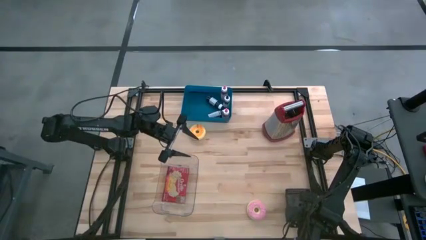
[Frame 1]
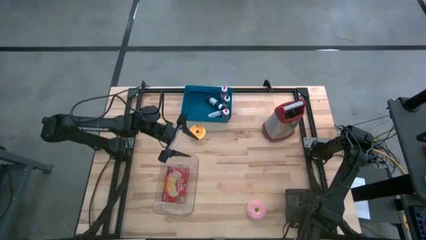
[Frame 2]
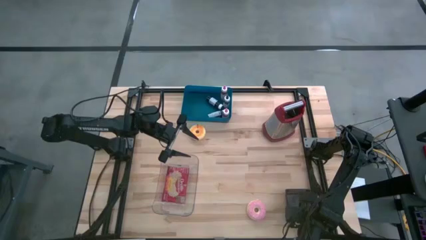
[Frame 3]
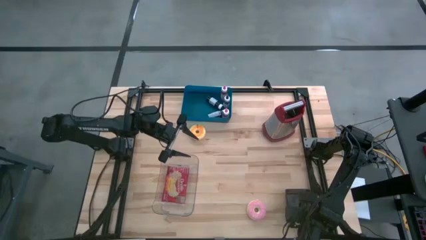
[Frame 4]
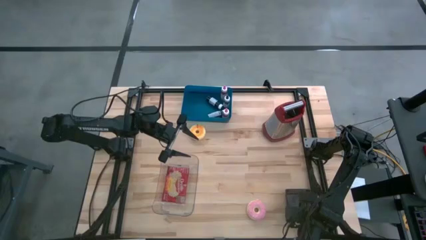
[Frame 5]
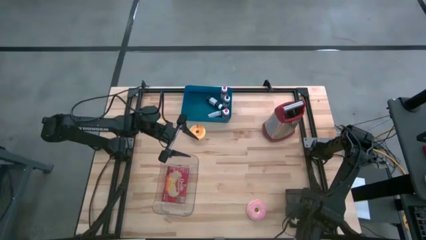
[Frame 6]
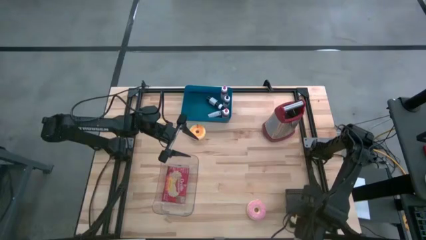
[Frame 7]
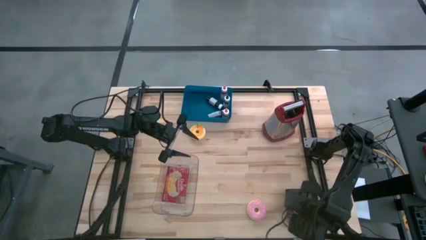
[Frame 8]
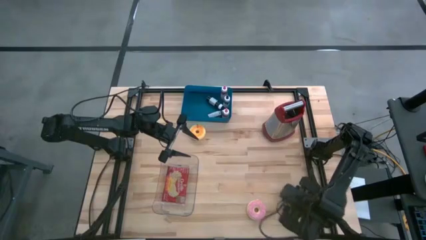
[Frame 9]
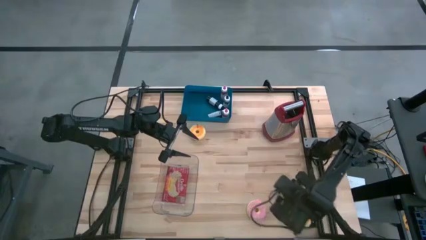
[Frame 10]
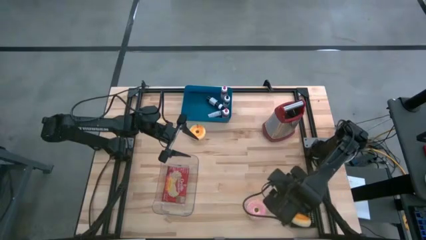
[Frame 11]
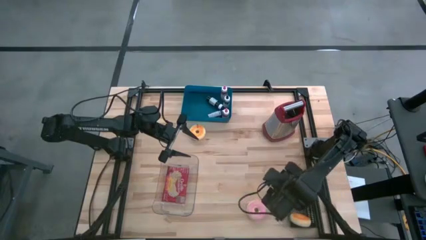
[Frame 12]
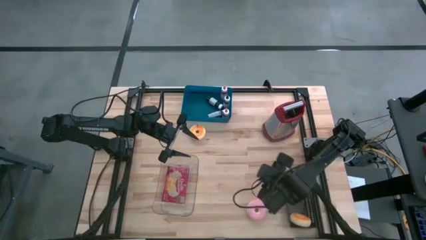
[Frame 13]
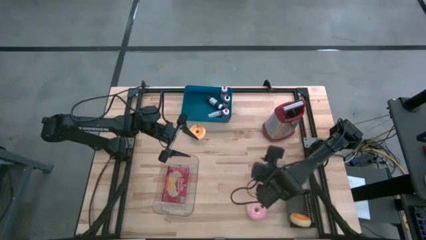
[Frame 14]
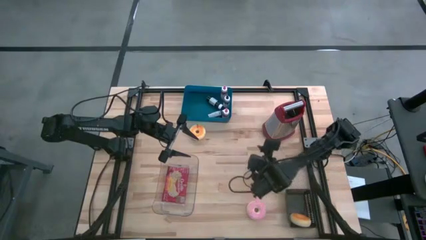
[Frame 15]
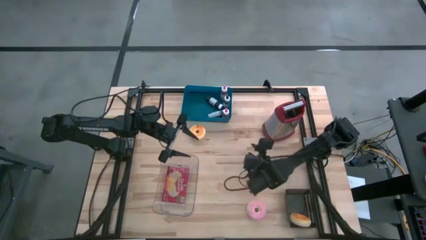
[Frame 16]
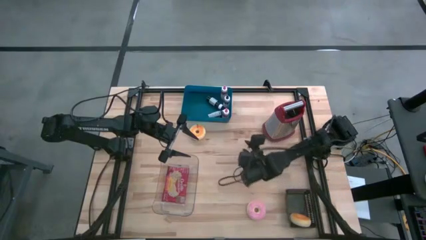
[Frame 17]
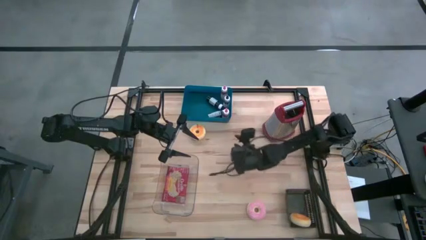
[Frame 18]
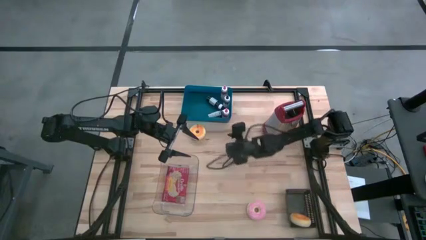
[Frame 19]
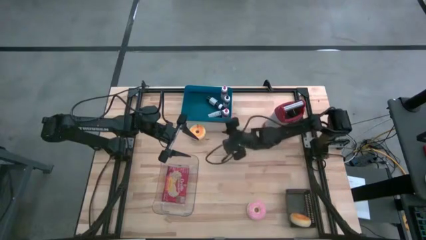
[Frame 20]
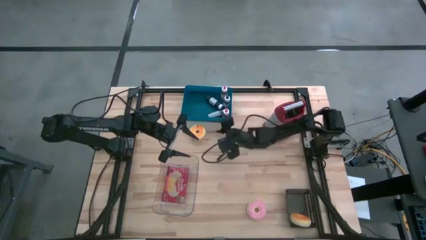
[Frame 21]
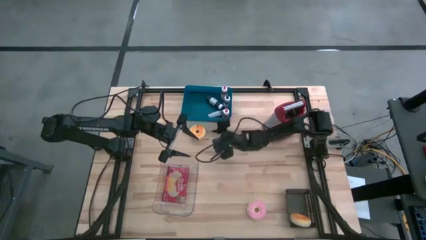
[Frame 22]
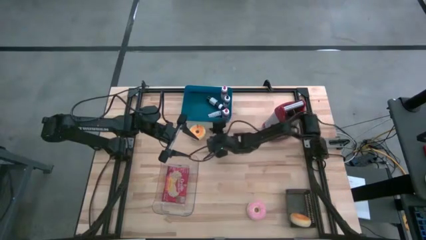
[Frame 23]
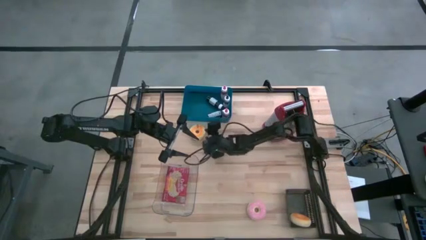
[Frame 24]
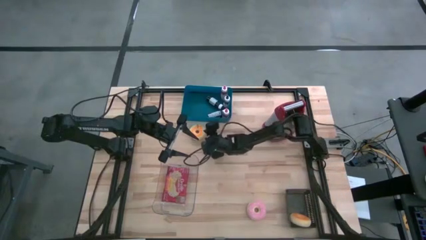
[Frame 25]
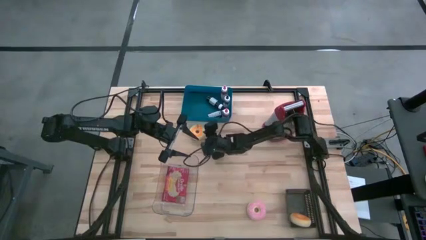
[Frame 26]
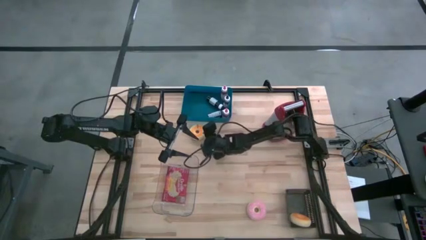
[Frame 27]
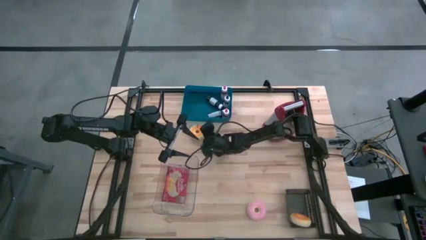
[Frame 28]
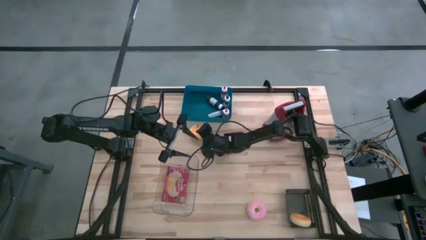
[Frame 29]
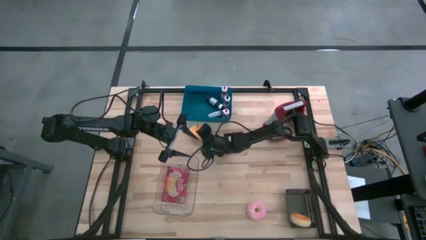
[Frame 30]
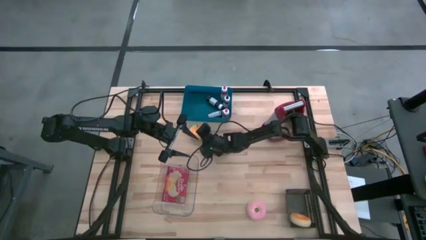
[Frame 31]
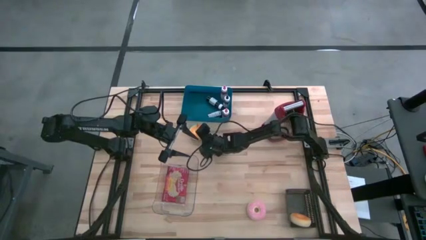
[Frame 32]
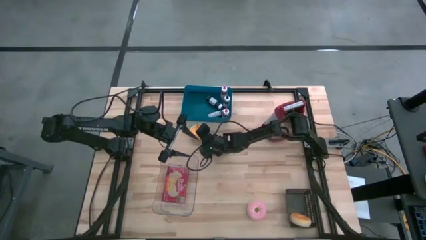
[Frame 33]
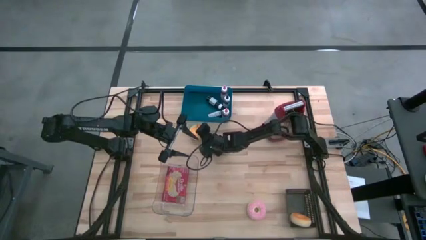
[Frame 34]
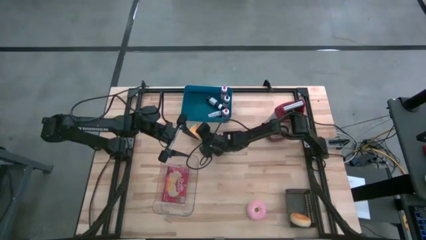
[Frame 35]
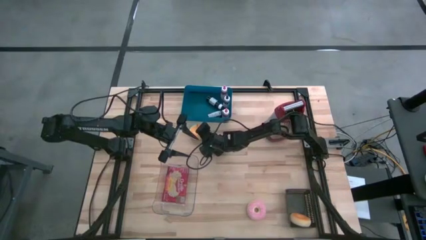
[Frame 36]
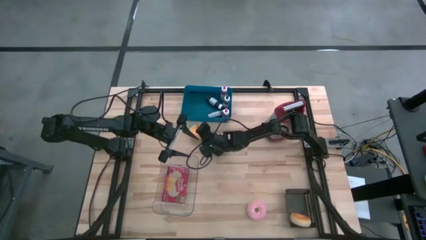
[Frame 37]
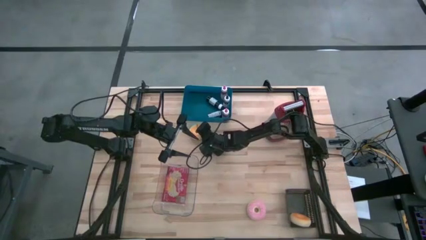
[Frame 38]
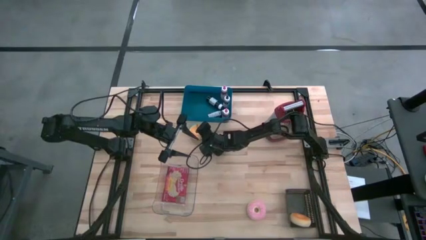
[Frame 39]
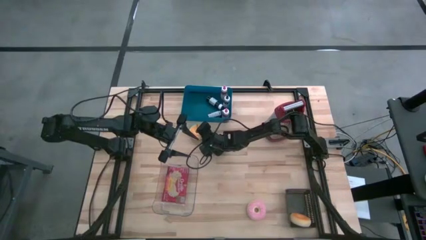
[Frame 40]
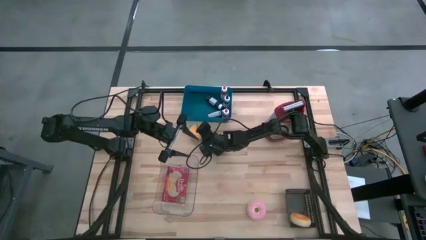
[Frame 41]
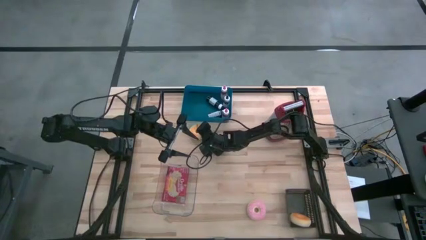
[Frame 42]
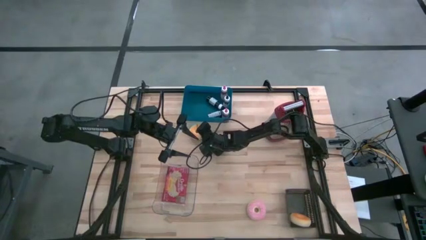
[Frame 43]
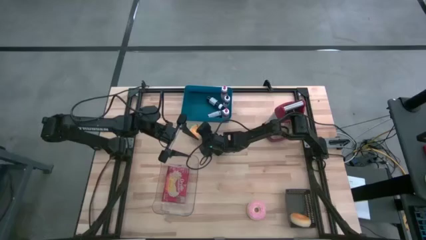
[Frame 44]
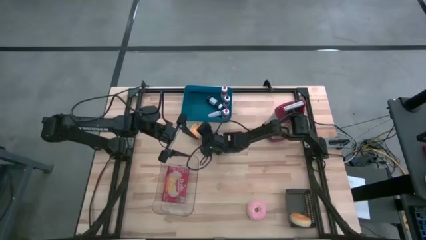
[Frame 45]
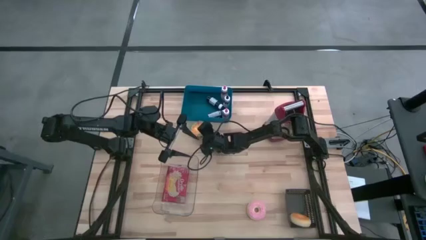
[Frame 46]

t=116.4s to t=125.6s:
Task: Pick & Place Food Item
Put the yellow donut into the black bin
